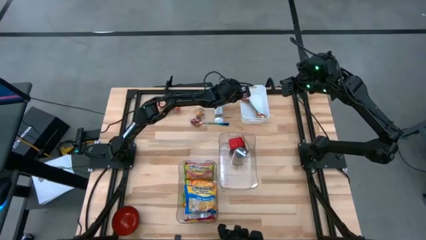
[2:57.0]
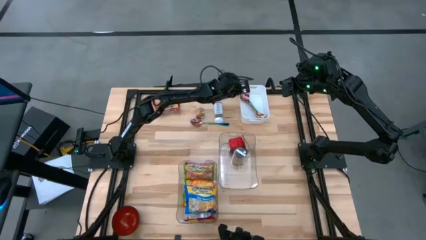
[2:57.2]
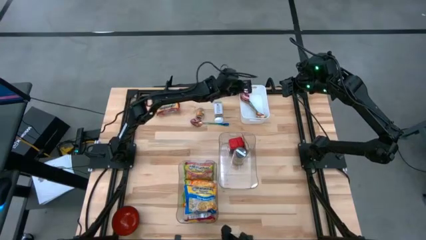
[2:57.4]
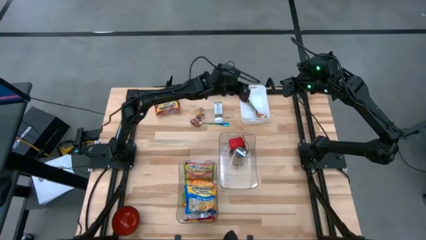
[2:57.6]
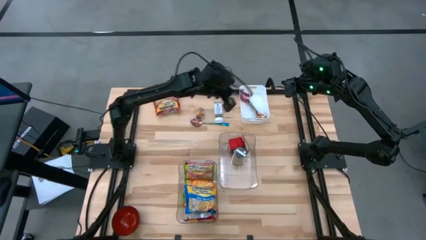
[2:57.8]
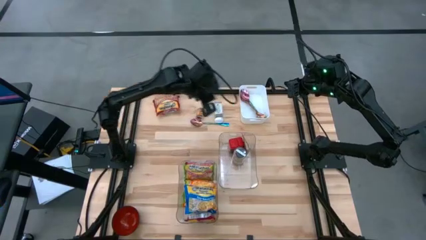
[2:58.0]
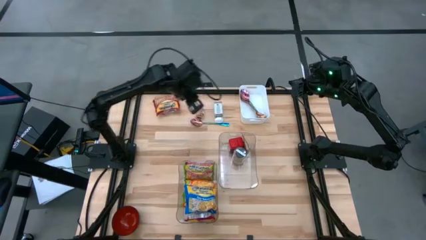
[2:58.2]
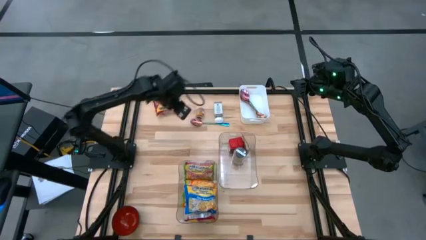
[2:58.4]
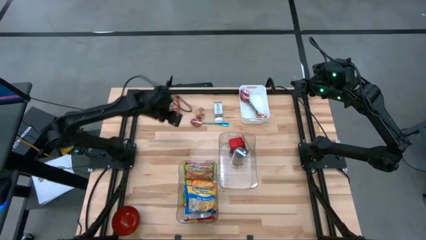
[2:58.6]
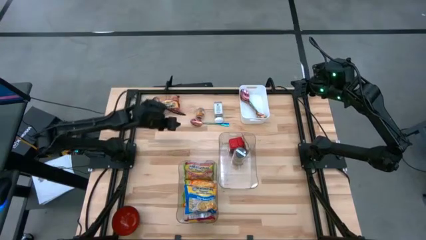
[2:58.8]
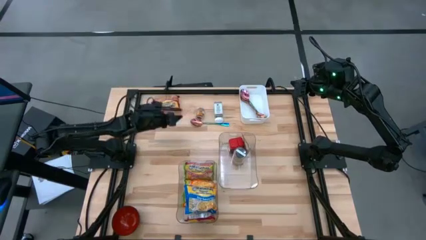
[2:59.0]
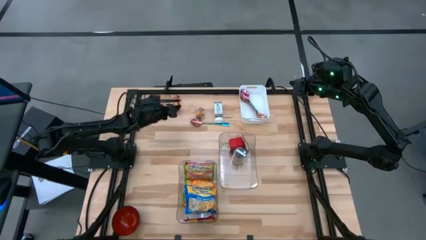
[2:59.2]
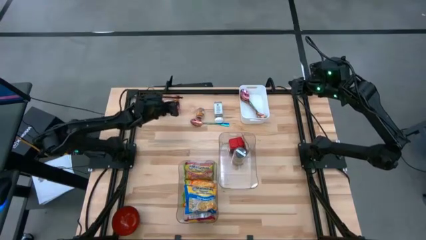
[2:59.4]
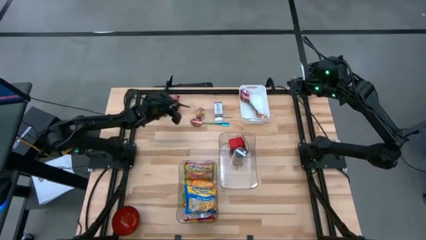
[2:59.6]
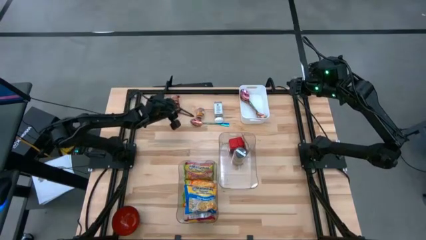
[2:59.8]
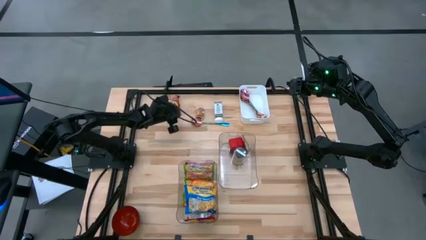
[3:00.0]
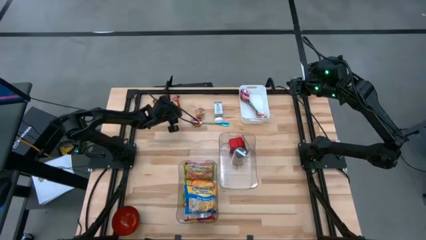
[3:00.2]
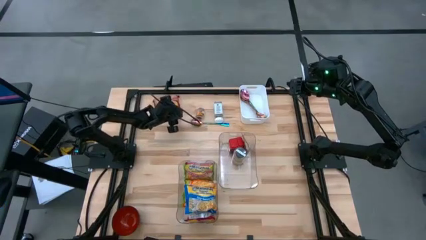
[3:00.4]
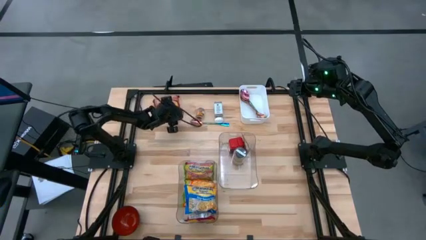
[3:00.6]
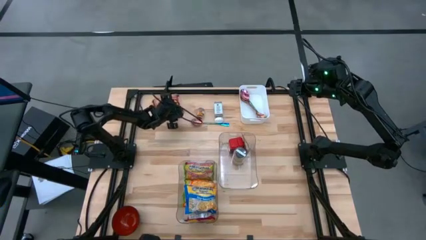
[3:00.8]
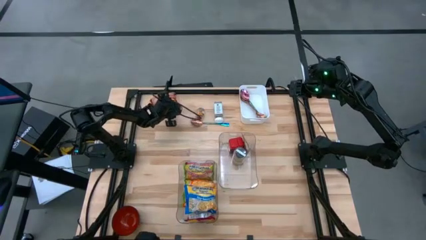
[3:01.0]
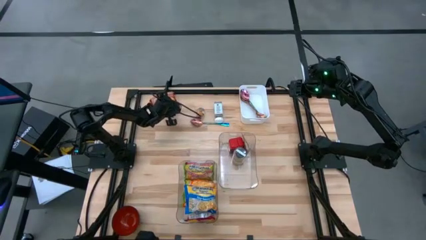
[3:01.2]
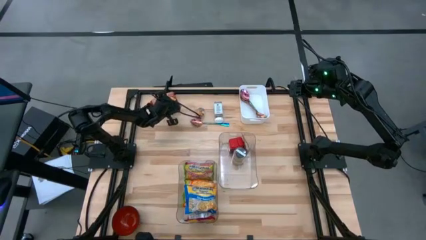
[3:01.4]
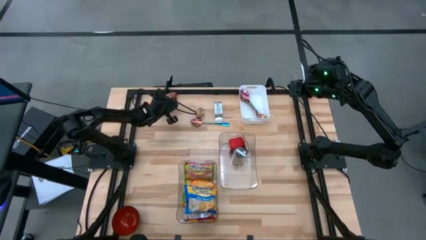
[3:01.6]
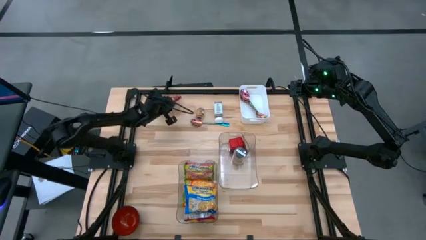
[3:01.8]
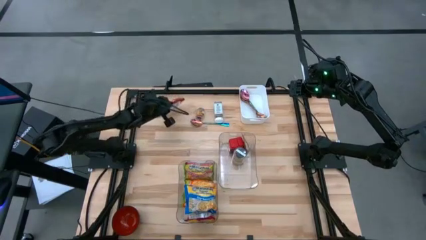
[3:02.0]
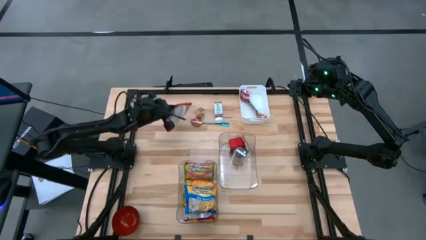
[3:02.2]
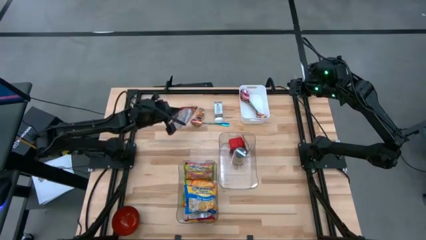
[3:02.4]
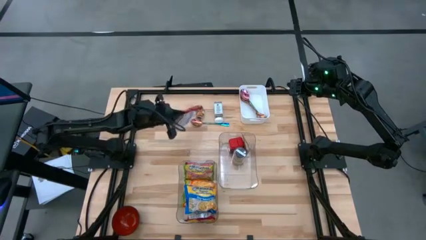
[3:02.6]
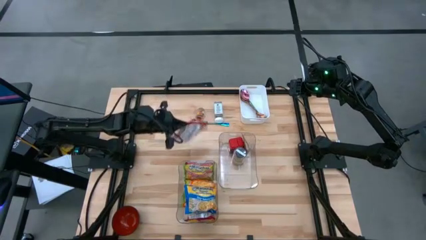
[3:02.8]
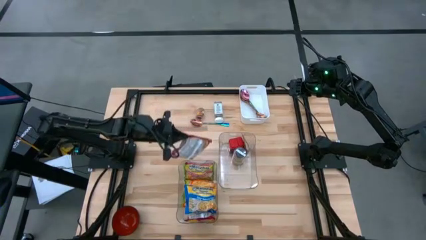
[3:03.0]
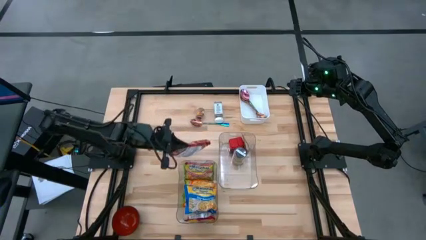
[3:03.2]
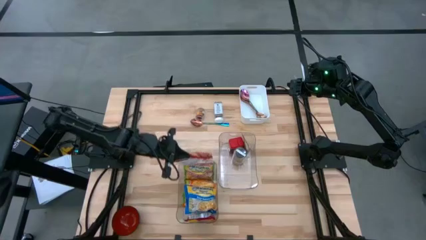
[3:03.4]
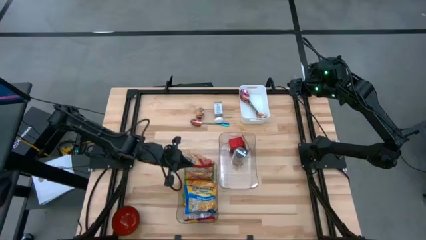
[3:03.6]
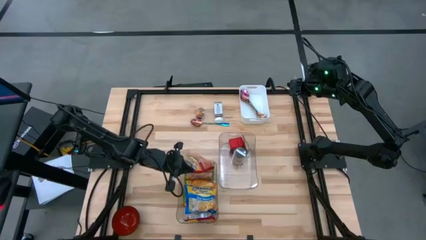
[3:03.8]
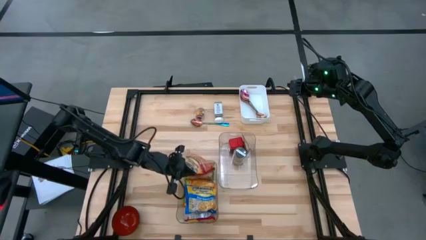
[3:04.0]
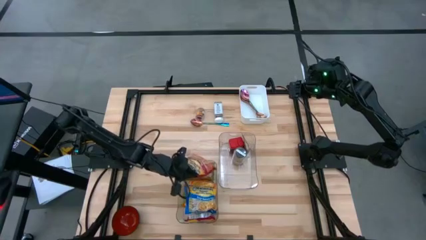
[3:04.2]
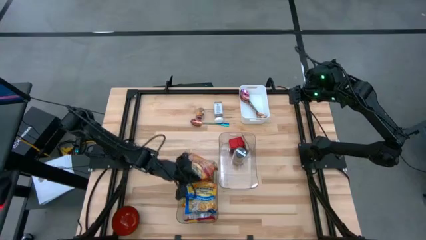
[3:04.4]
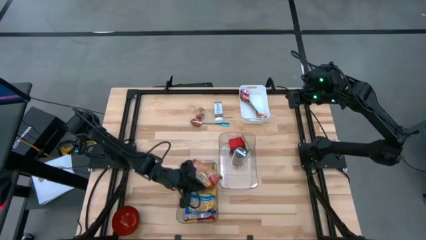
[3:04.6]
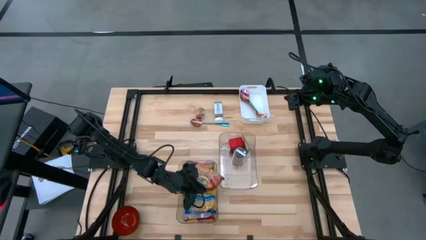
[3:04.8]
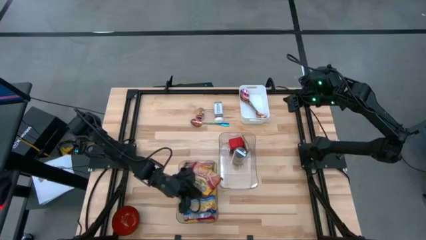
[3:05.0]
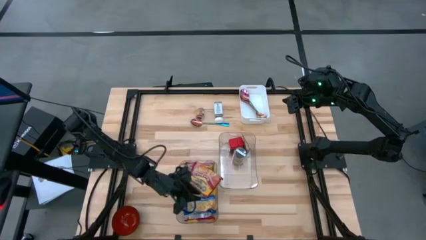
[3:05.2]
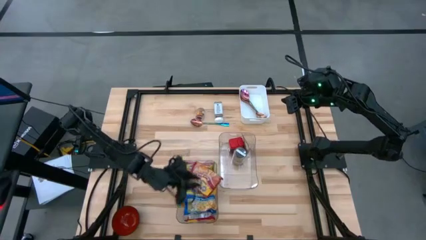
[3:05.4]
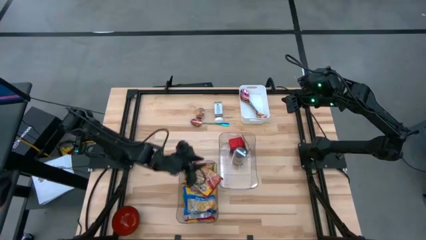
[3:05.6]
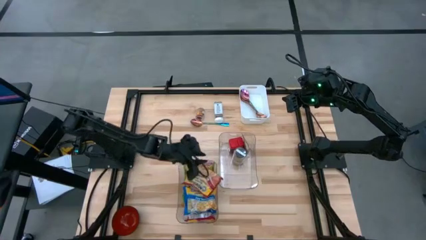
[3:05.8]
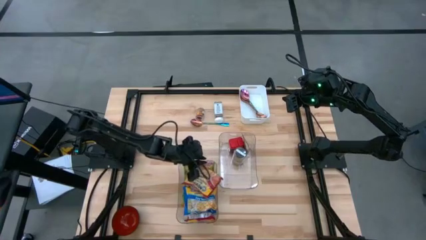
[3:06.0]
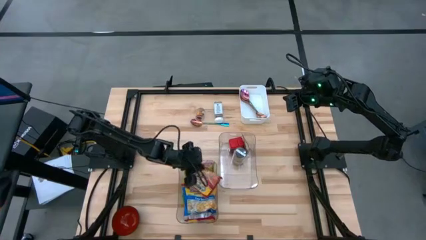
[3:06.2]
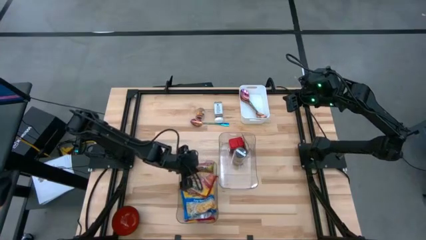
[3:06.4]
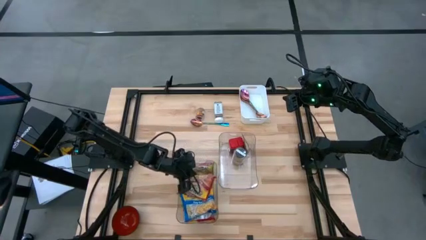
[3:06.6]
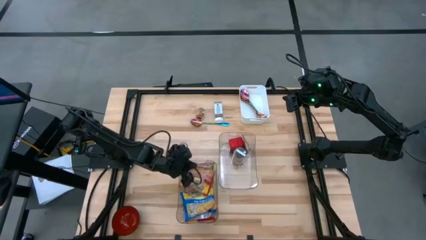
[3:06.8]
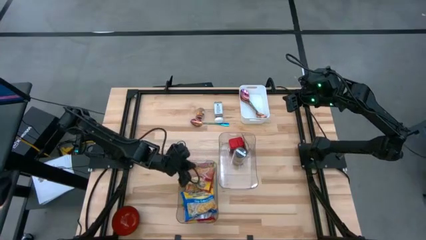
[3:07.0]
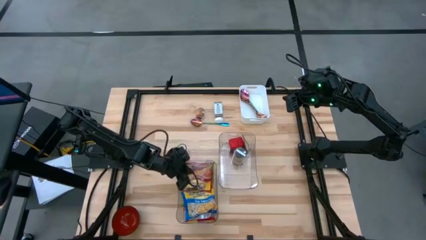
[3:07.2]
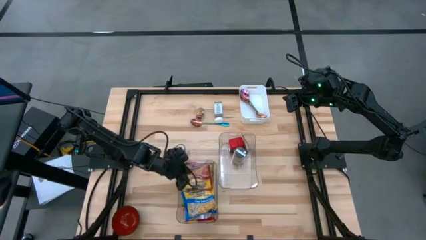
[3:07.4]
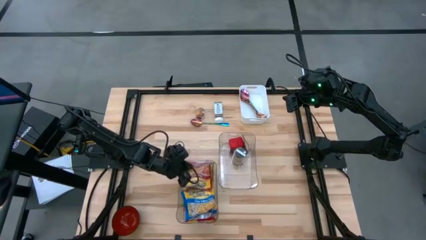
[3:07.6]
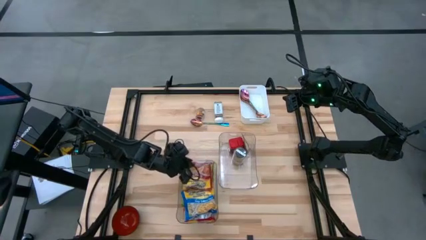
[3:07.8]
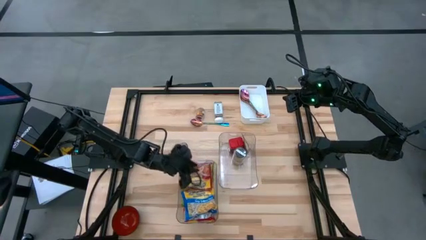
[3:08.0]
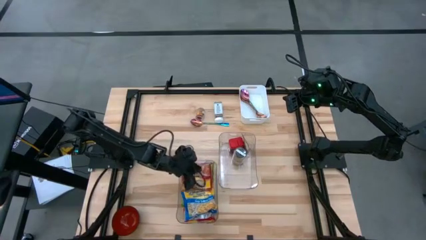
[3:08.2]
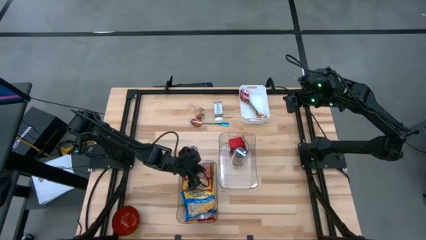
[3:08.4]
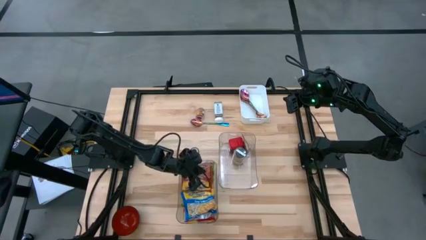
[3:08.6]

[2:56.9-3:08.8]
Task: Pick & Place Food Item
Put the red noodle pack into the left transparent bin

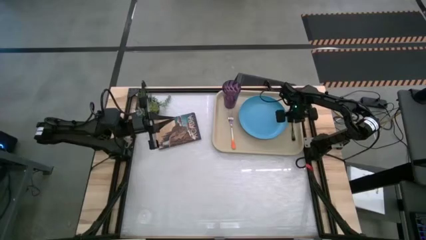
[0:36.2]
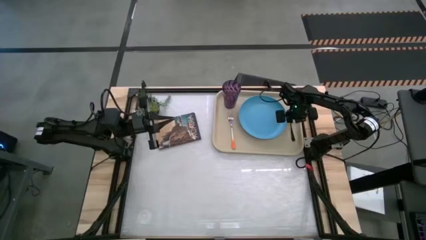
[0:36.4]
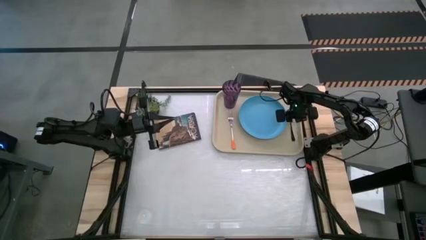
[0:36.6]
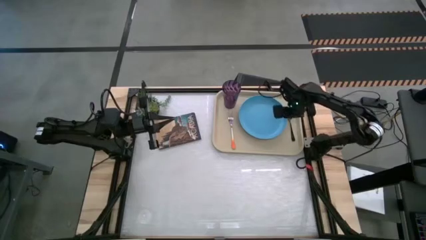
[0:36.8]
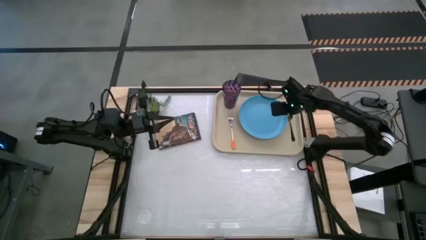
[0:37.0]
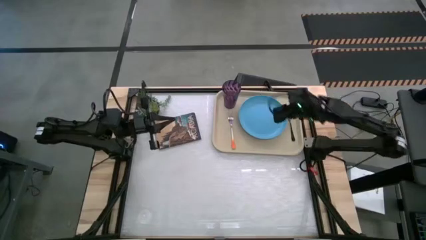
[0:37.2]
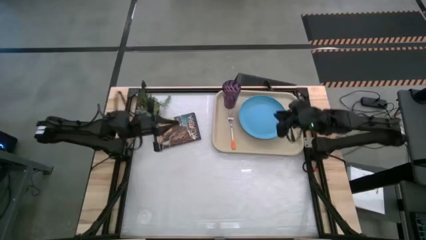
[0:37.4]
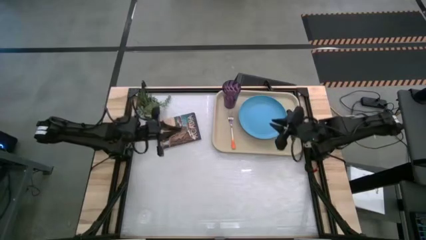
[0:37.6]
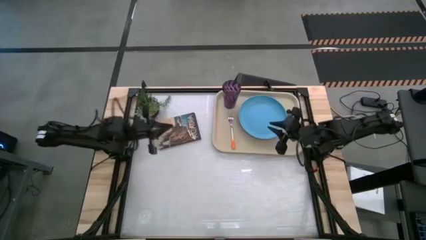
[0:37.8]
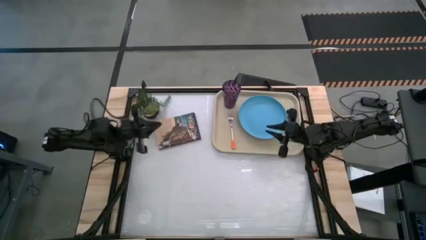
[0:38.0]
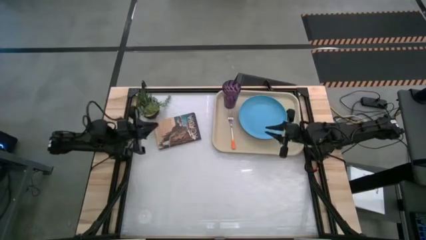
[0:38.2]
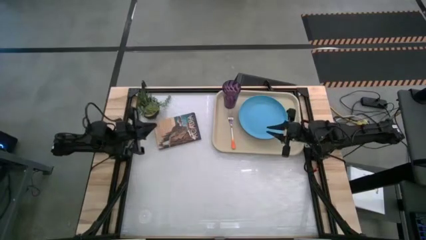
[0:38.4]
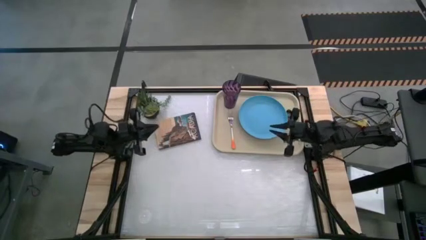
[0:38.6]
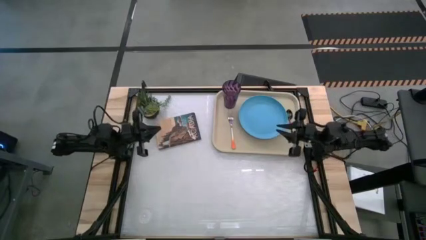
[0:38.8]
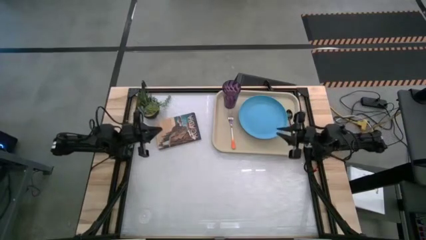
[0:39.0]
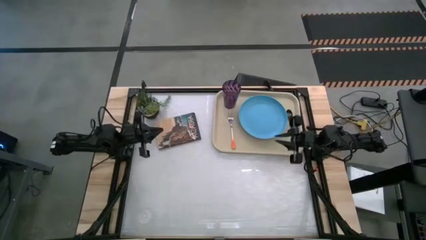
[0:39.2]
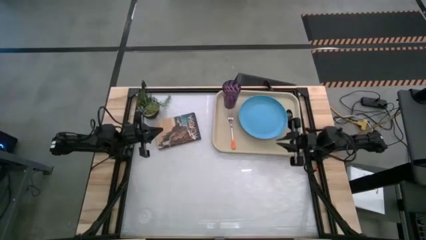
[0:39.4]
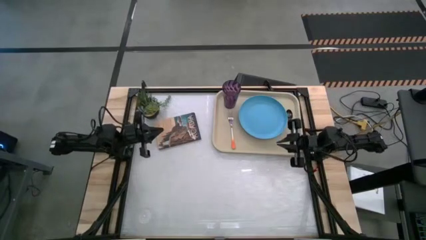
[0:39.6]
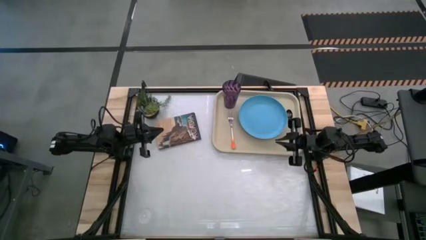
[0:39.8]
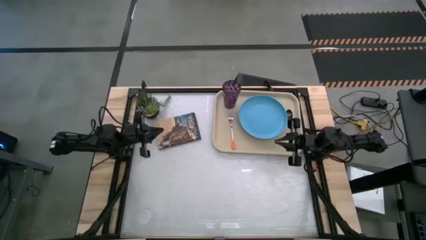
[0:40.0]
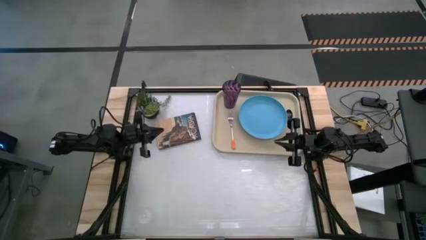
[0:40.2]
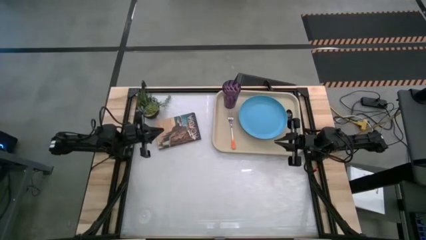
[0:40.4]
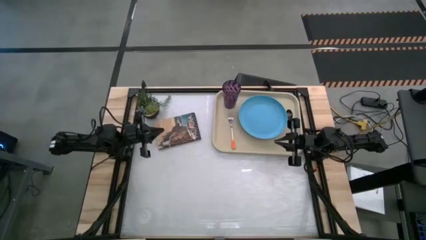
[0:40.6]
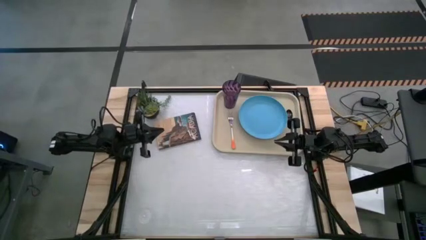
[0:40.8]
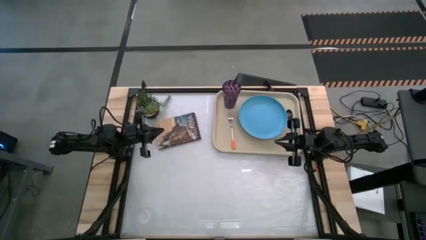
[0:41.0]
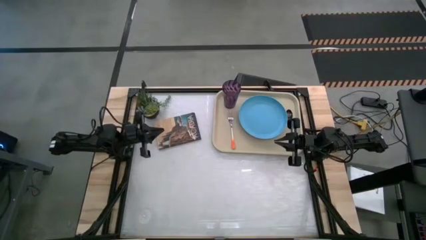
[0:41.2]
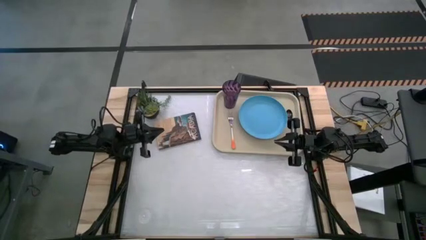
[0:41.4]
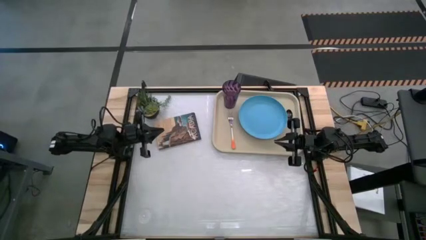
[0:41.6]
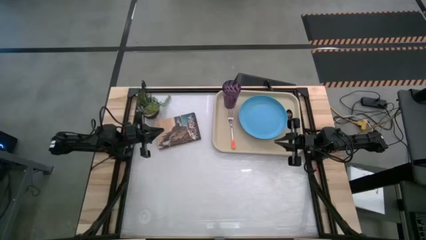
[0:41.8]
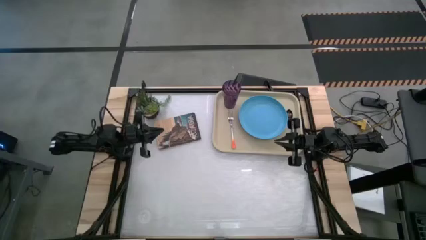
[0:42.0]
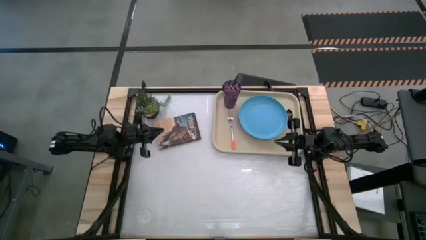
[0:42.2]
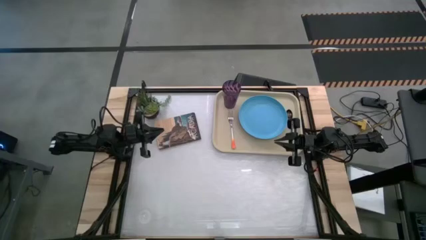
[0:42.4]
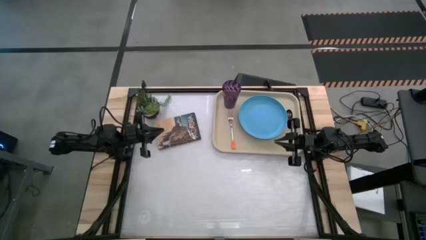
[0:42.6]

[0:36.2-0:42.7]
Task: Pick and place plate/cup/fork/spoon on tray
Return to Home Position
